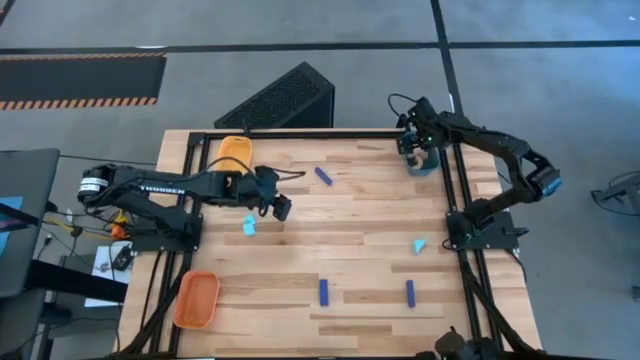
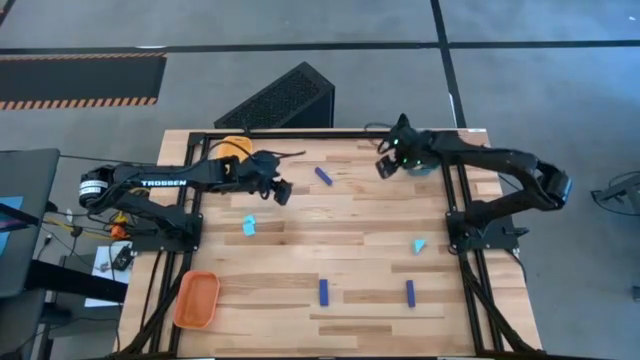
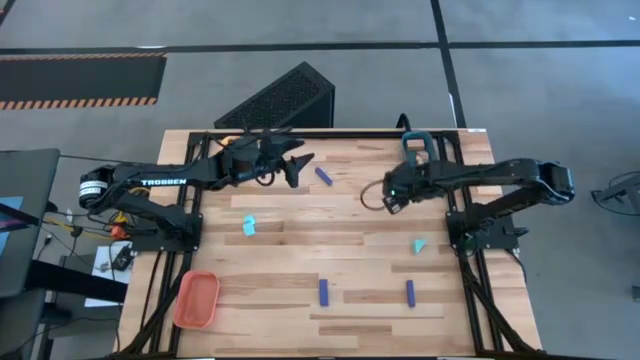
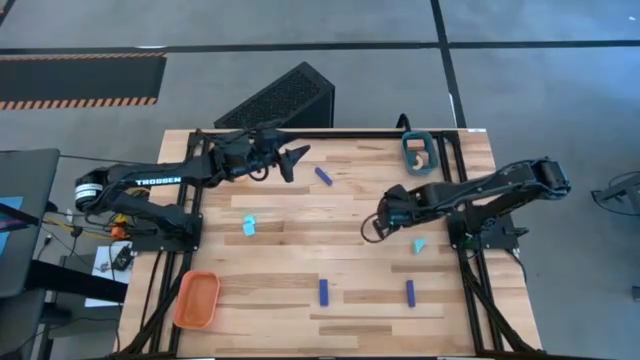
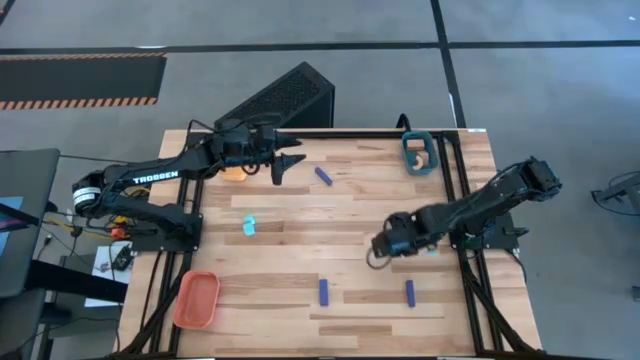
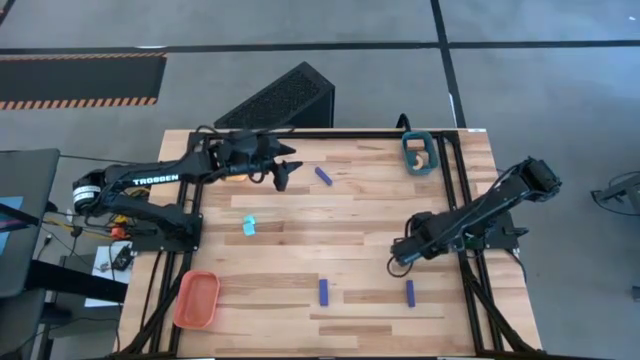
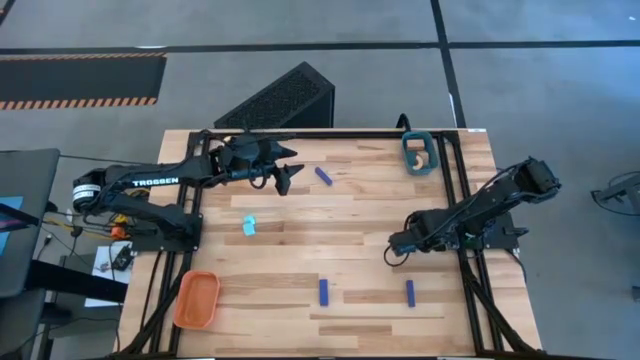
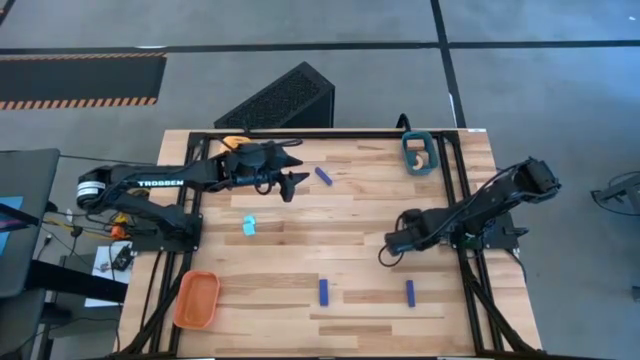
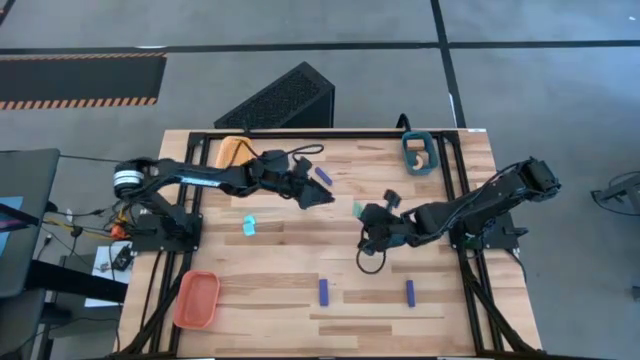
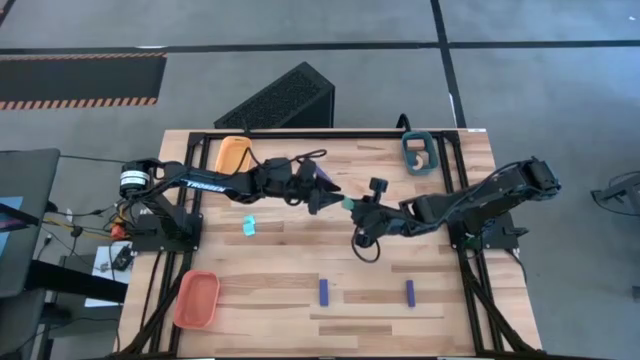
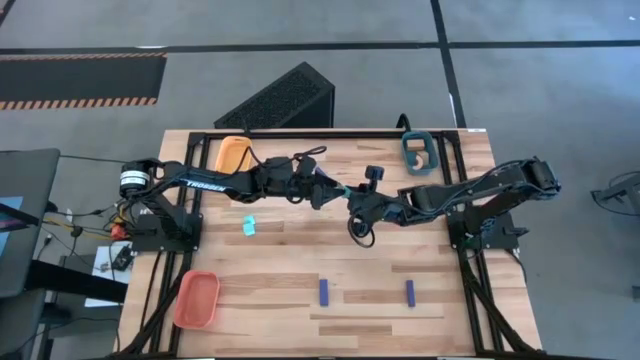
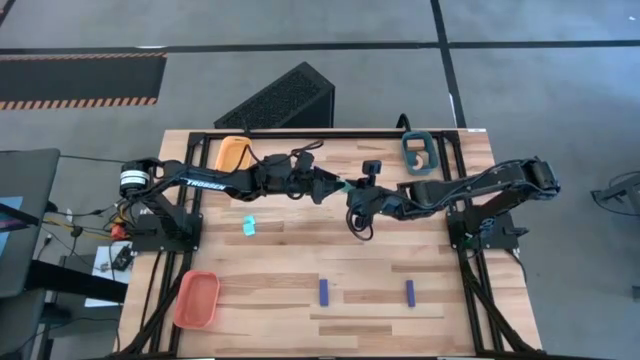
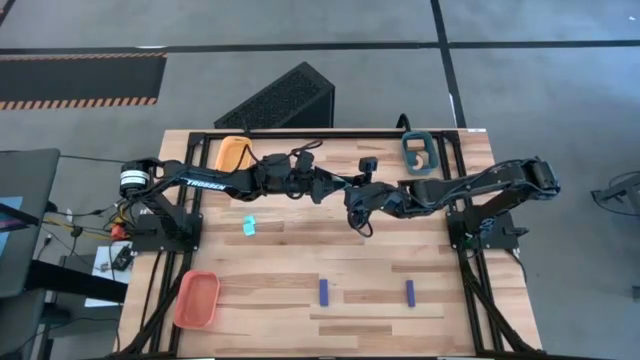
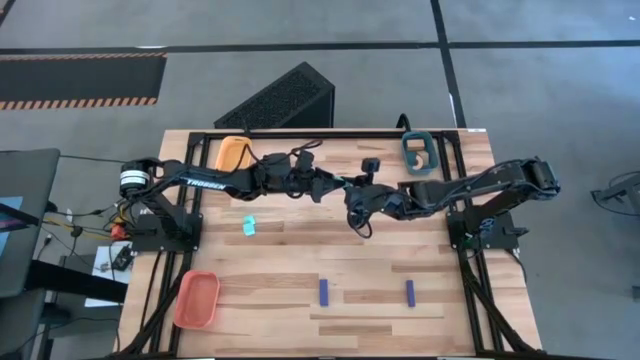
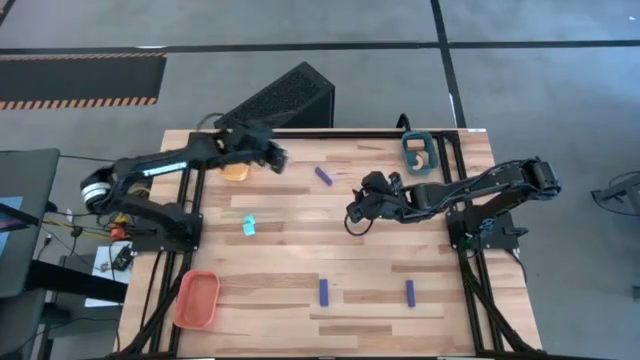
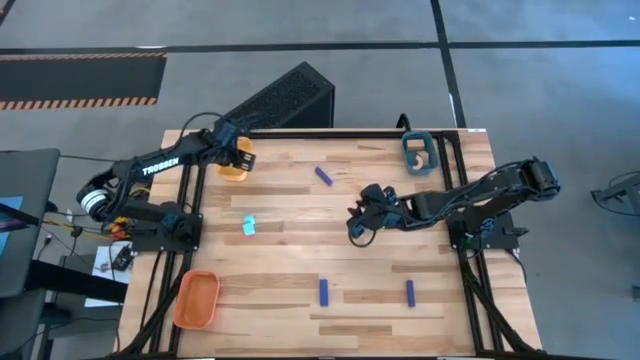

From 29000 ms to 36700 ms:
Task: Sort & place blocks by color
Put the bottom light blue block into the yellow bin

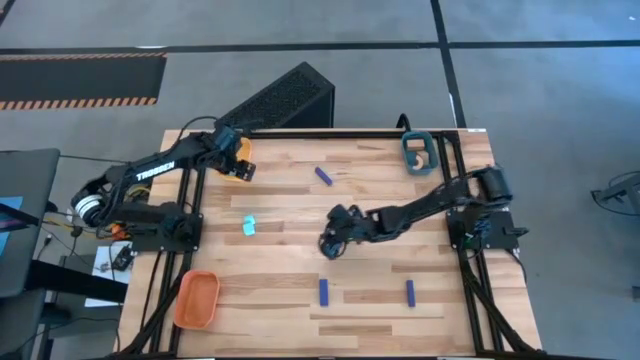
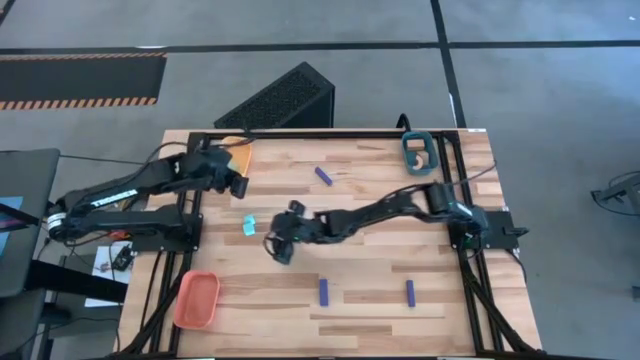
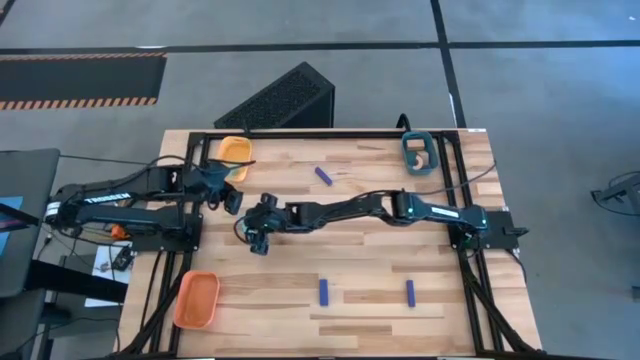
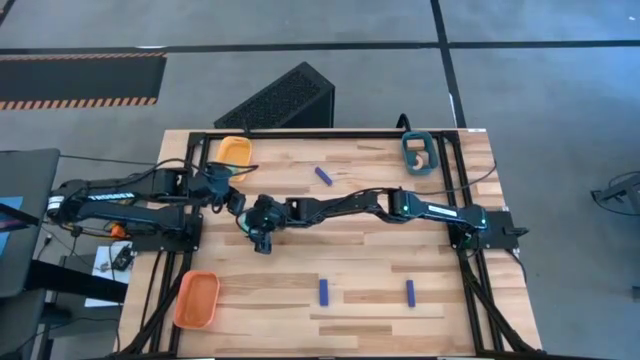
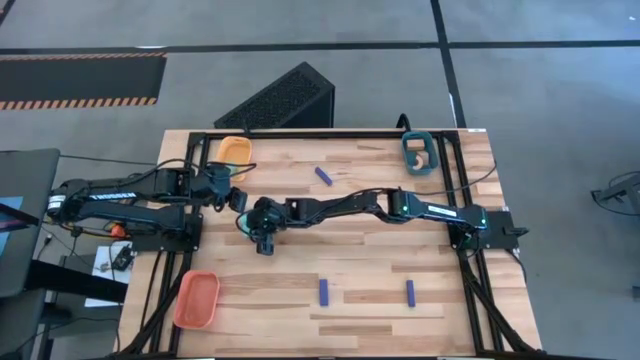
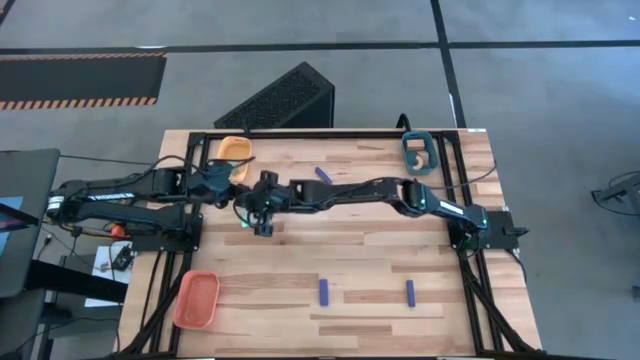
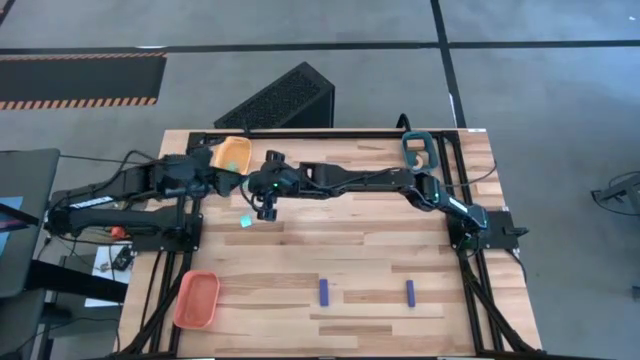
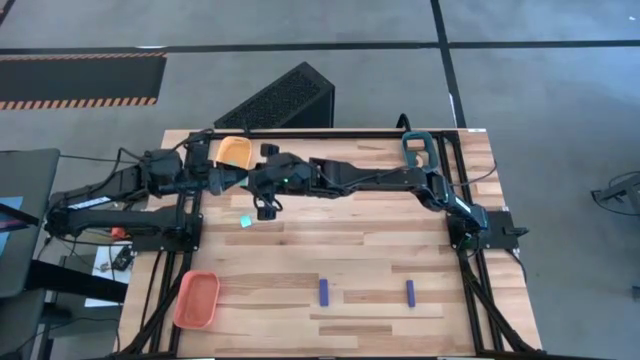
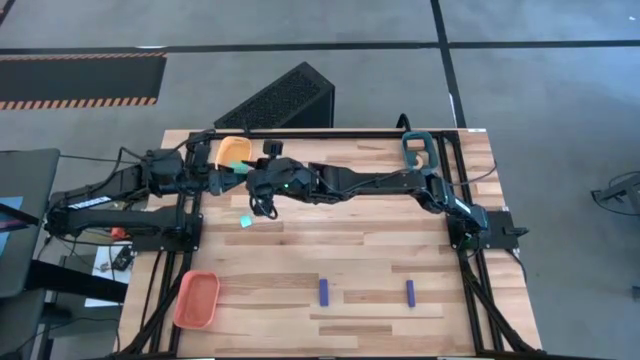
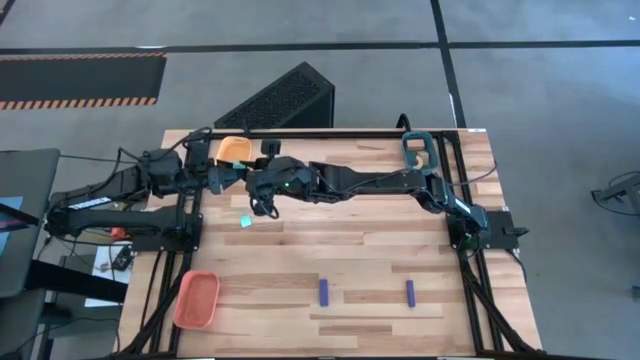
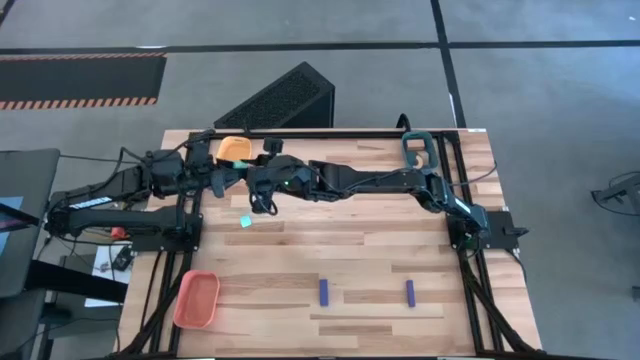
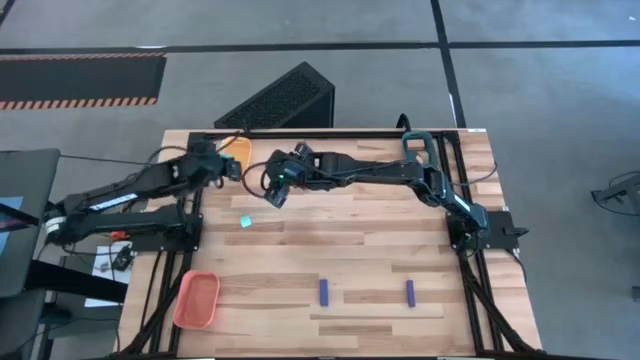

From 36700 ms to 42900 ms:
Put the bottom light blue block into the yellow bin

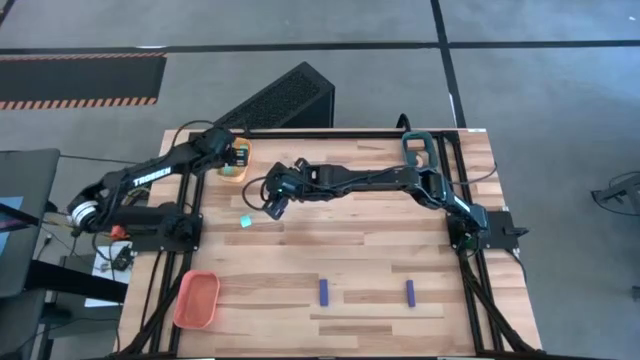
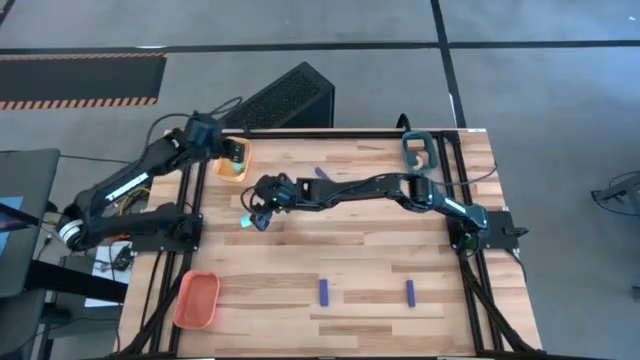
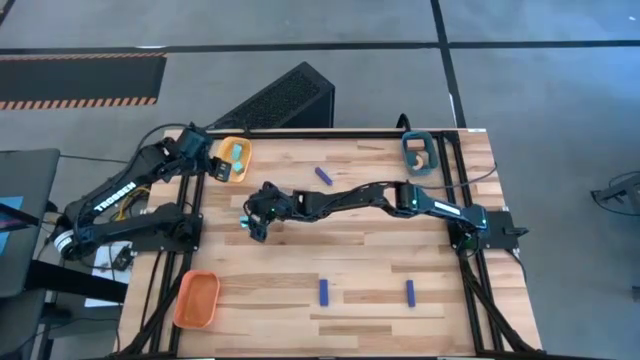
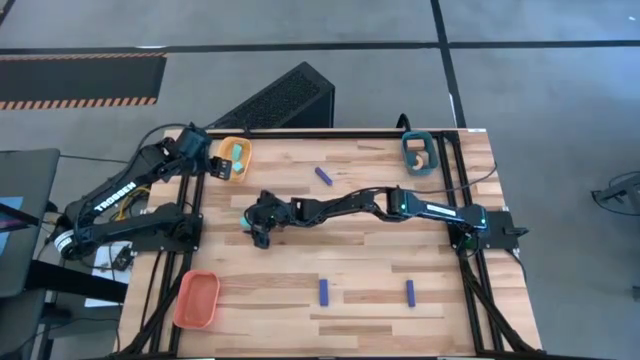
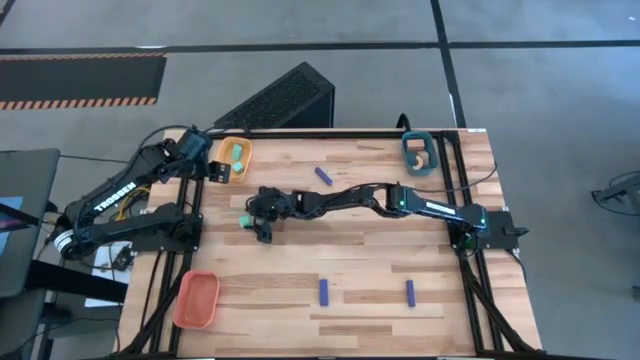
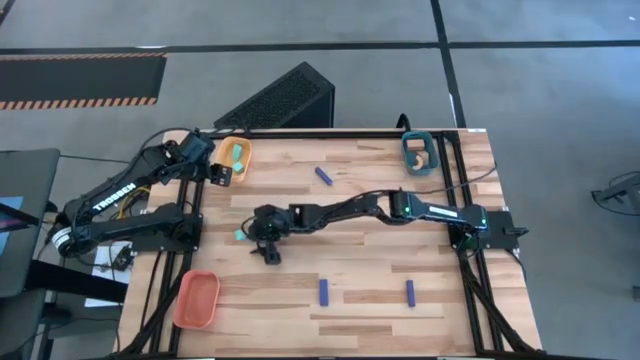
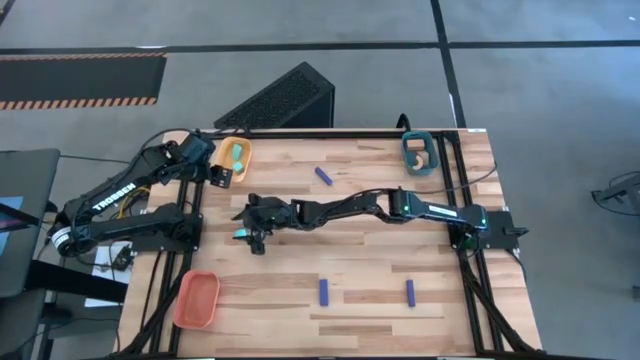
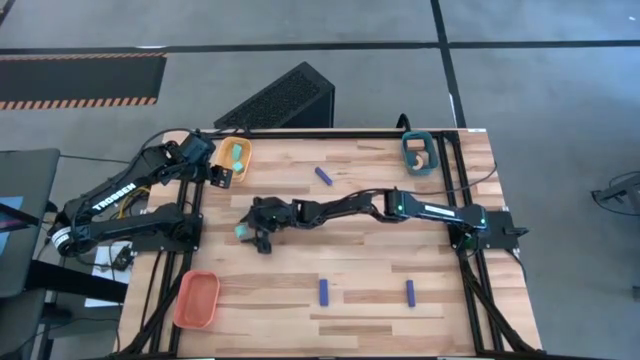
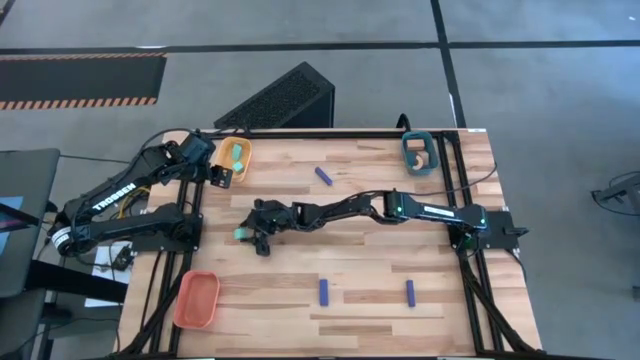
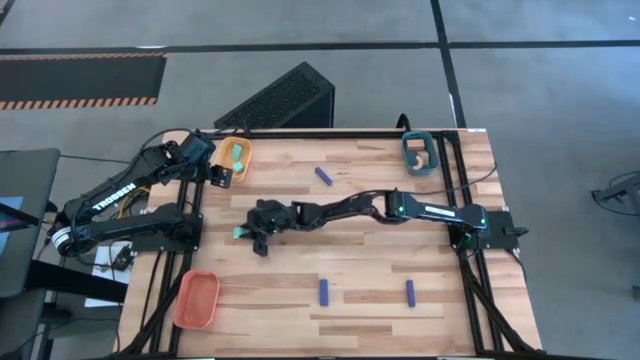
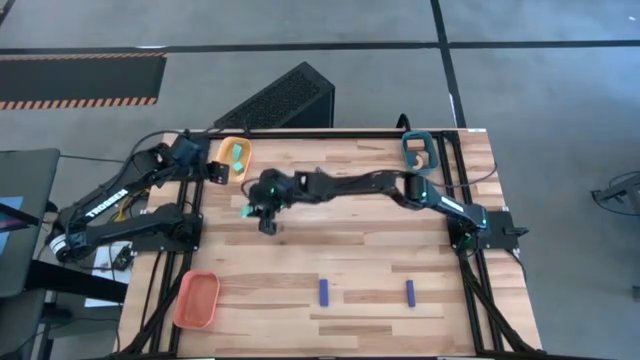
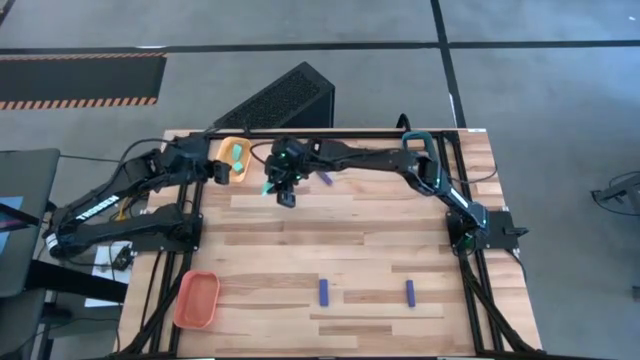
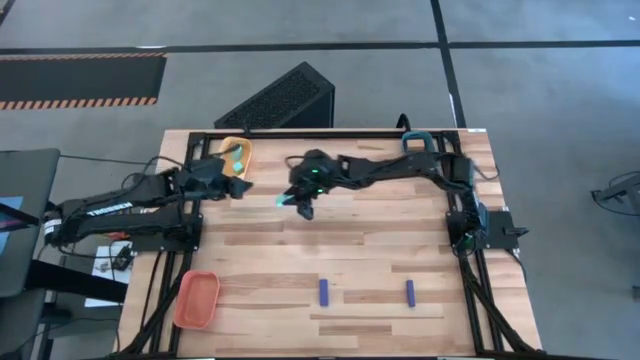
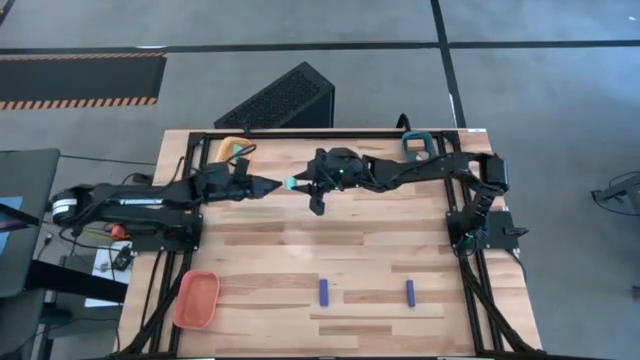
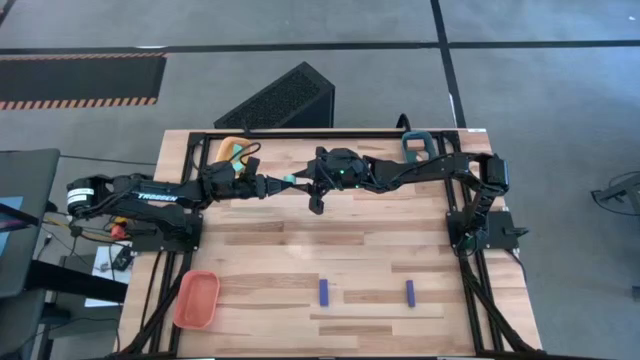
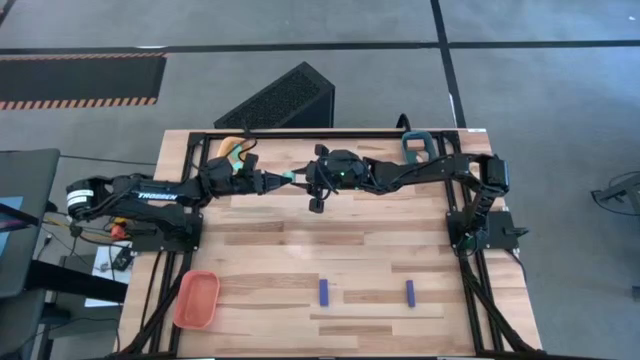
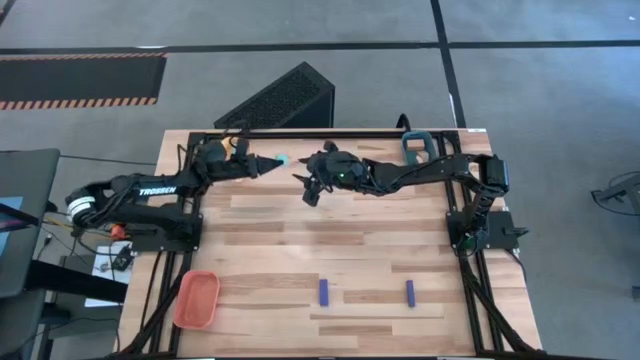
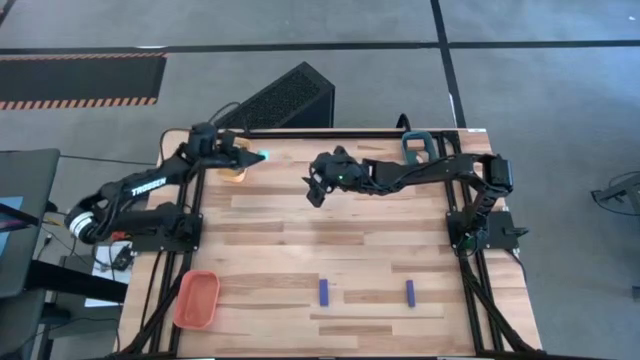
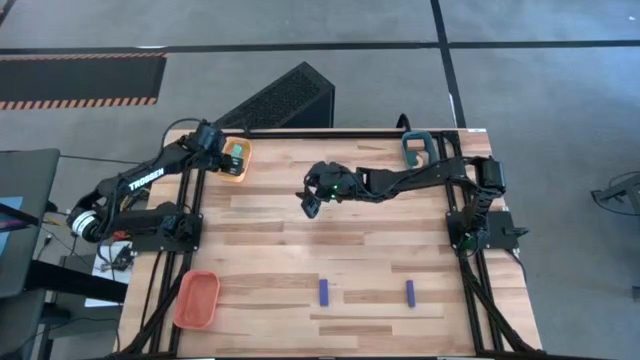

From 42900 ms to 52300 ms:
Put the light blue block into the yellow bin
